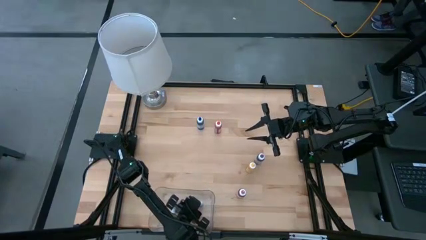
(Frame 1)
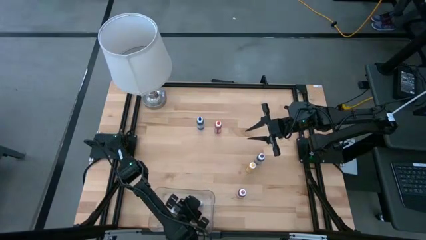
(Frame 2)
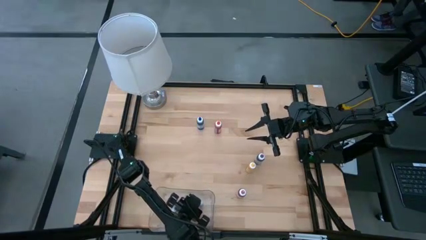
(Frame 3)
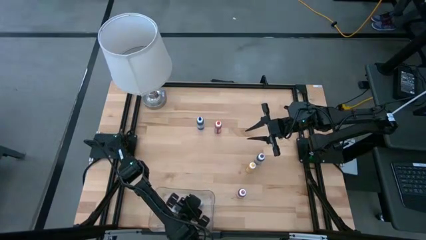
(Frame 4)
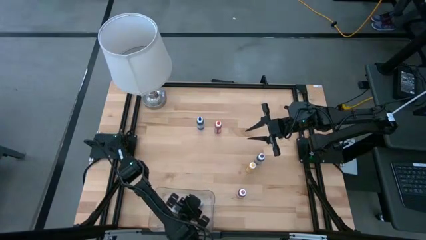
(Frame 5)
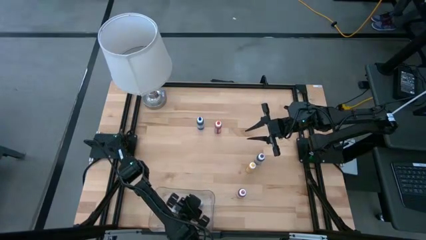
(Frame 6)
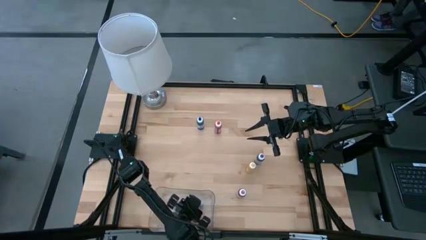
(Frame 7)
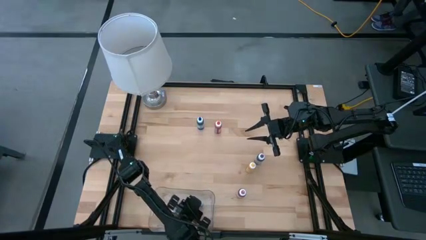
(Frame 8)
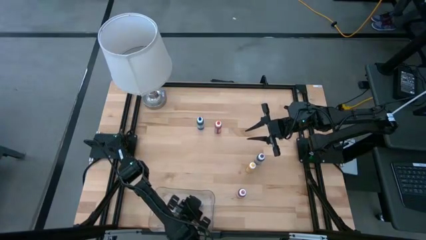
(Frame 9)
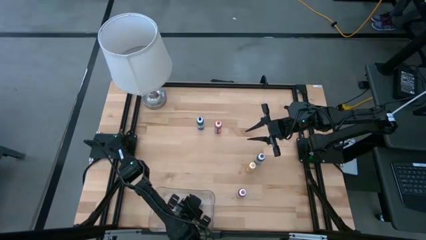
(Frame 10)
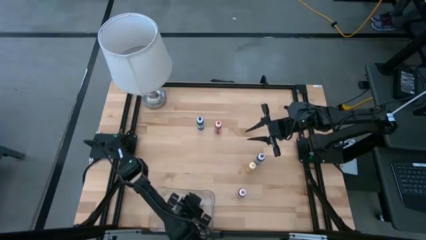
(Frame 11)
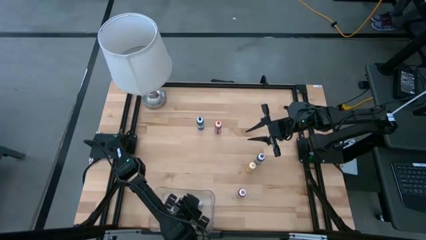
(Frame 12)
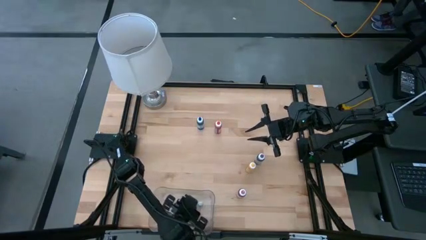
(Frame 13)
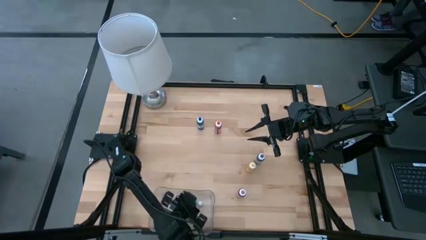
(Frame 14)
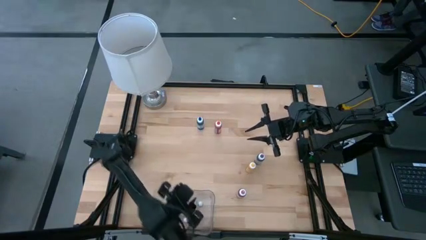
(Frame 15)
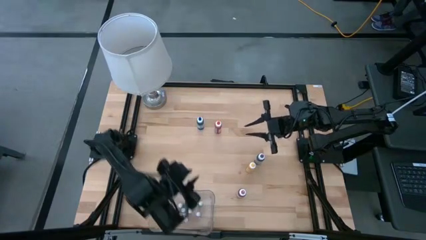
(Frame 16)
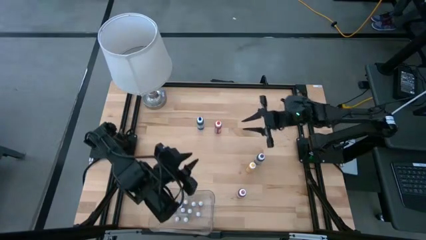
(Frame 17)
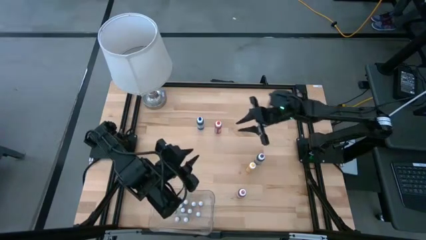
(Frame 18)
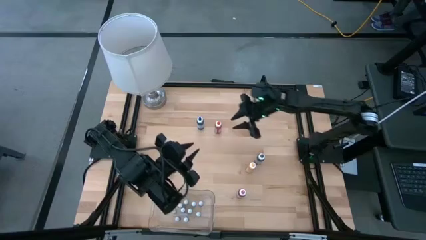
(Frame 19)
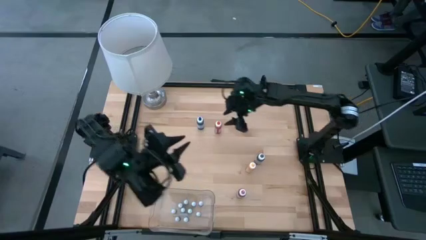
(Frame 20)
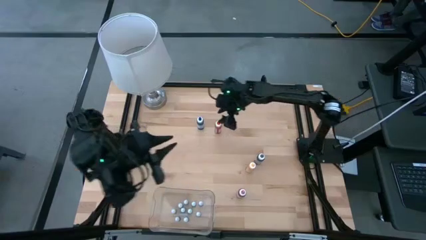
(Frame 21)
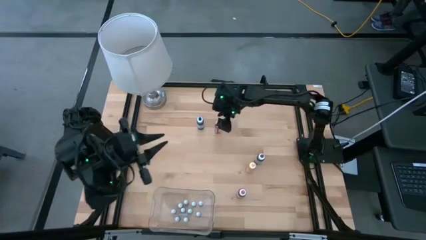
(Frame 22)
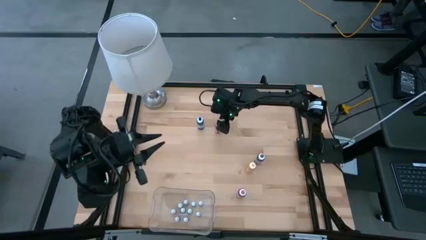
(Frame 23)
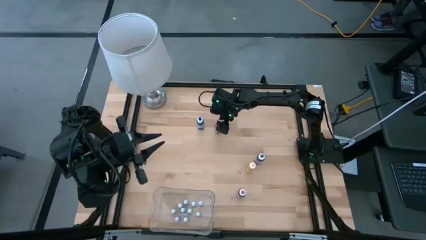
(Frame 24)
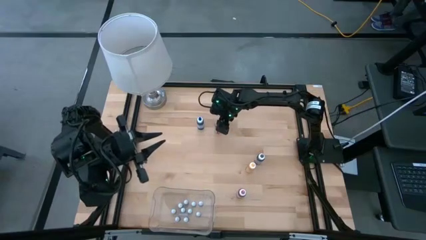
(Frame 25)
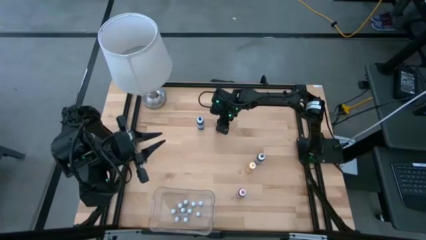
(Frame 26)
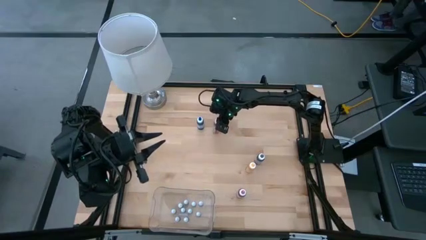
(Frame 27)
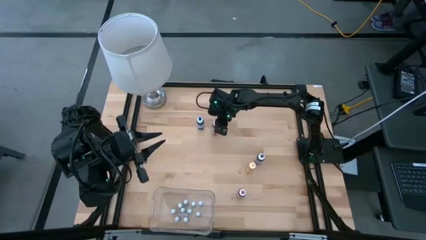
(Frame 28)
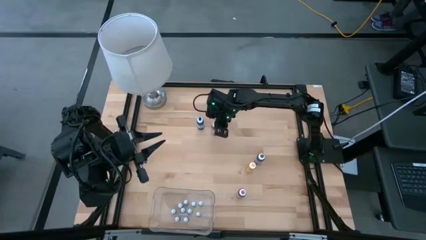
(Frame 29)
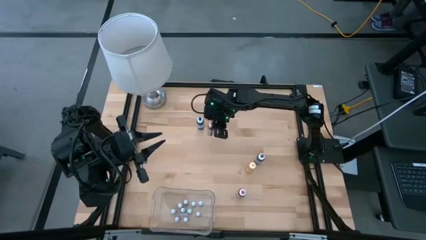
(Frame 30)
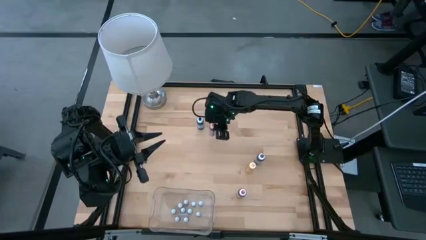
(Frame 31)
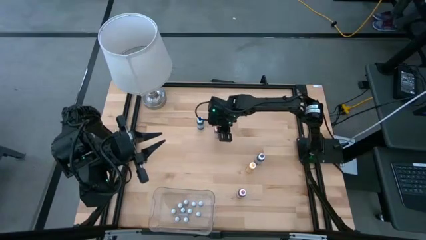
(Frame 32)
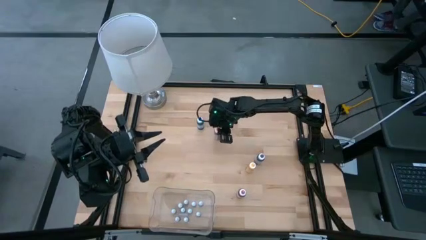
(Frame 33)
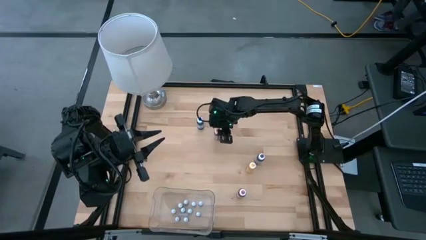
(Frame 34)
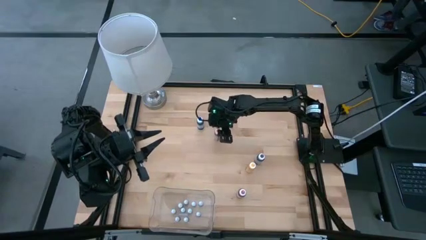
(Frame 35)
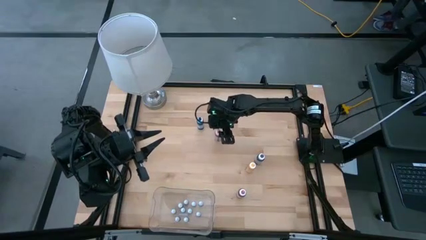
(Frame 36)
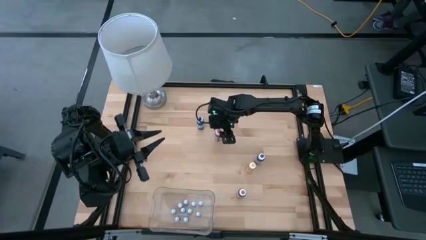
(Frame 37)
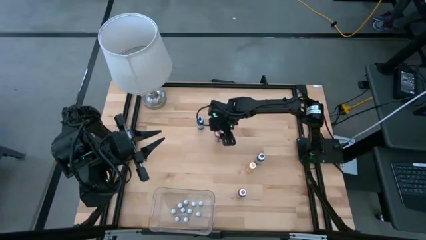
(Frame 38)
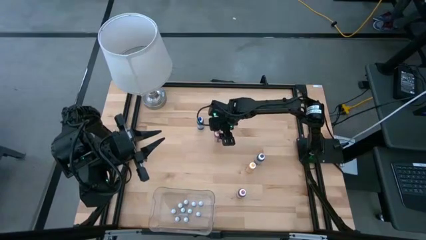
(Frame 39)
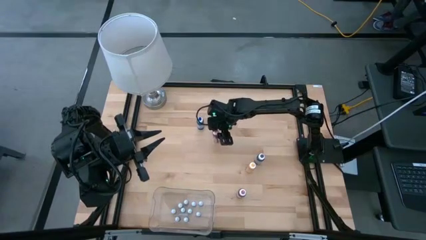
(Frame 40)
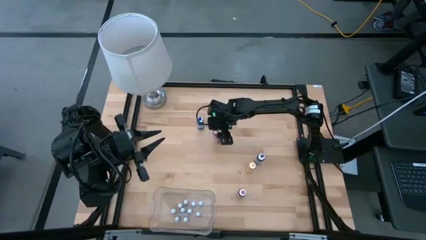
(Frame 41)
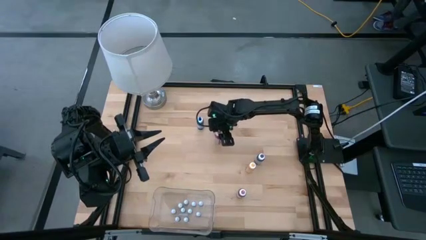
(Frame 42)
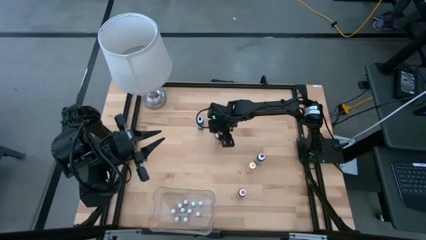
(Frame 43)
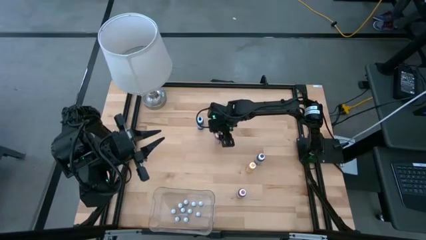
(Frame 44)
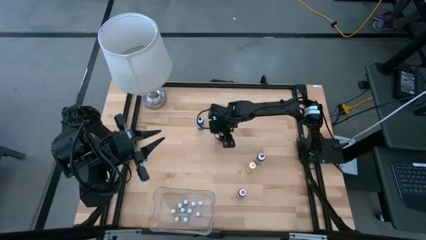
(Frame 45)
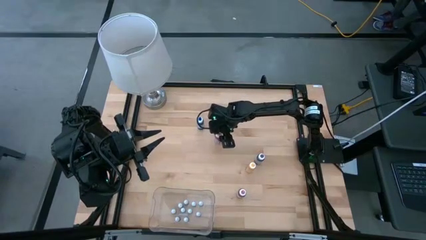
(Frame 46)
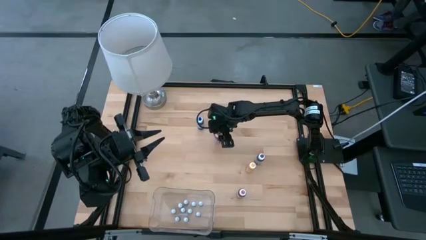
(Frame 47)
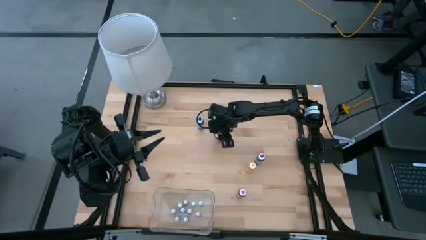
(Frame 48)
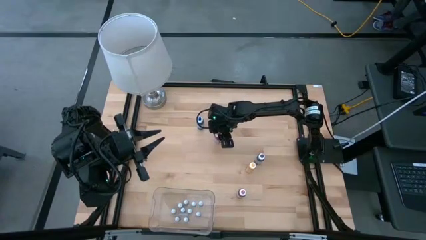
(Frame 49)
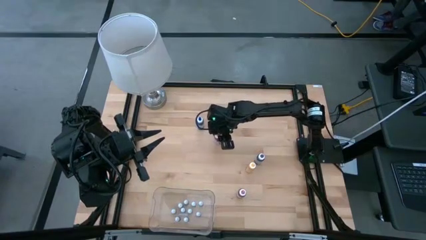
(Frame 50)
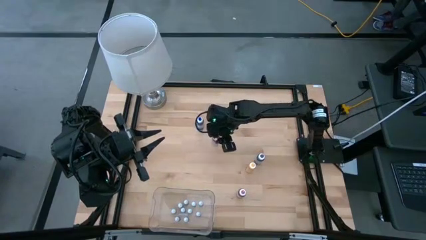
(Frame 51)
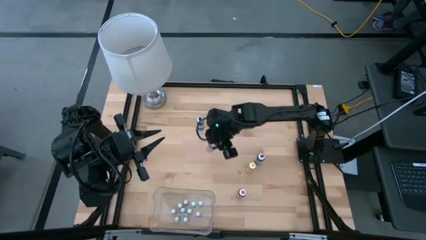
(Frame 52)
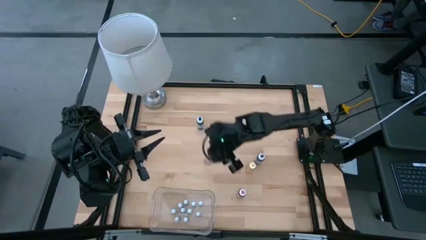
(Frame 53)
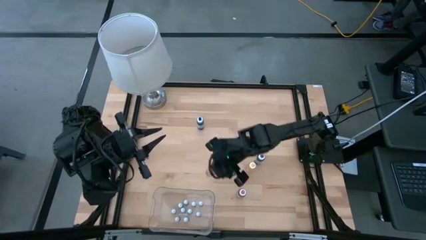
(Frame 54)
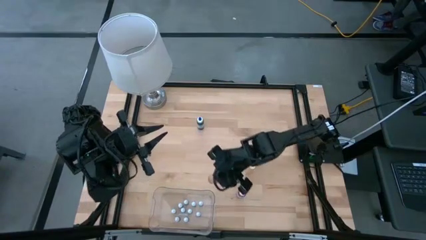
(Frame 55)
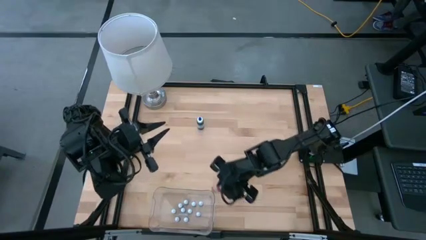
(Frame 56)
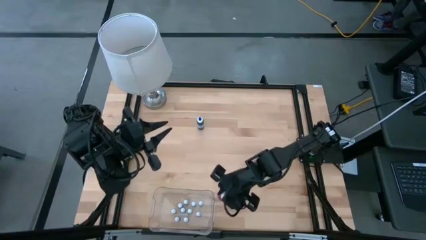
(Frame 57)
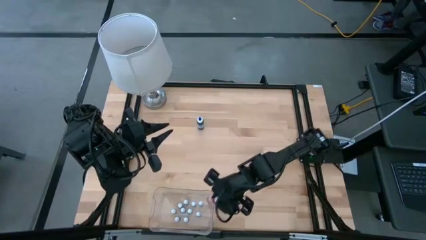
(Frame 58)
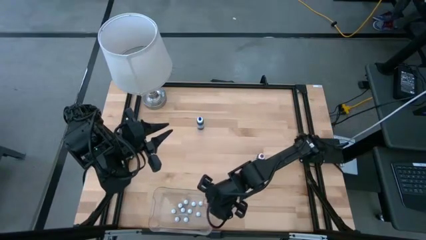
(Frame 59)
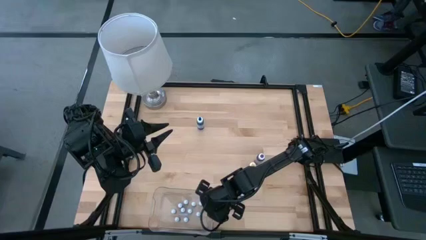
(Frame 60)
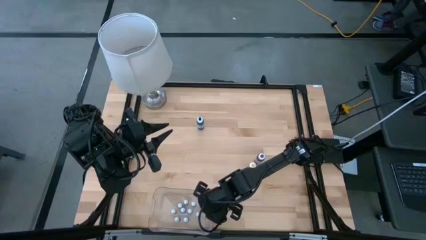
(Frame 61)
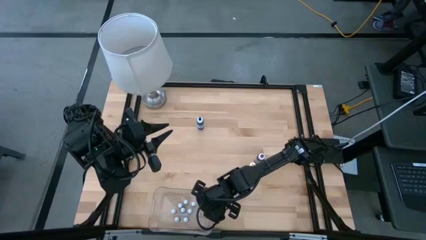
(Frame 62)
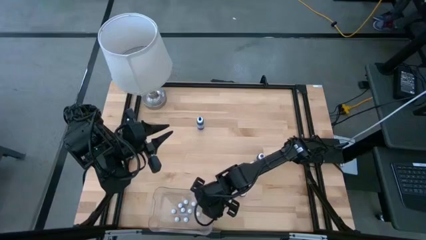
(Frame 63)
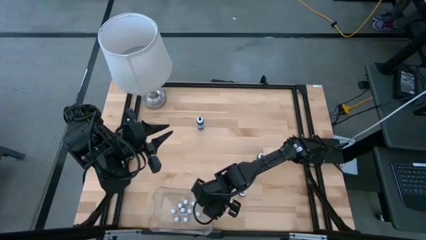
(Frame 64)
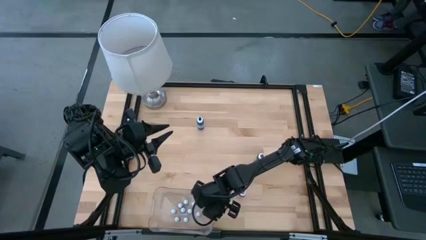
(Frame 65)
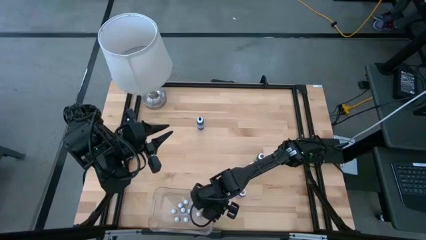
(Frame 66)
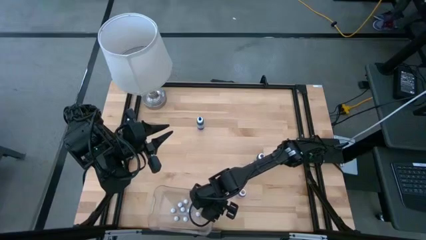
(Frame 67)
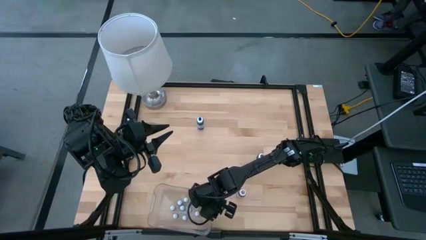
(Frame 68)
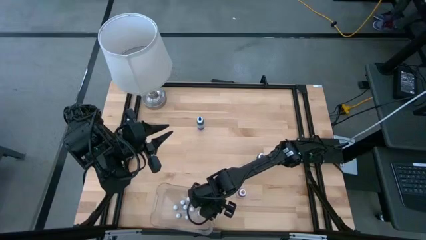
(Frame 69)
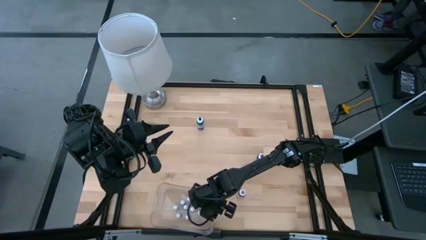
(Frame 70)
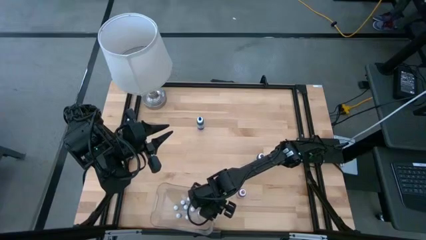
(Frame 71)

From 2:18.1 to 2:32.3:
Task: Pick & Place food coloring
Put the large orange food coloring bottle into the bin

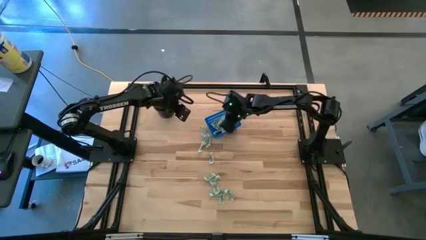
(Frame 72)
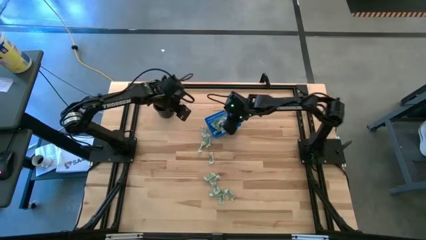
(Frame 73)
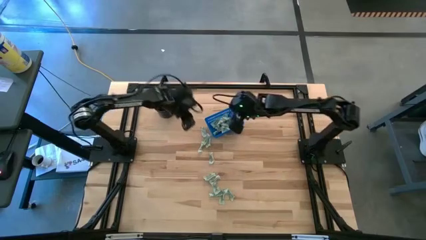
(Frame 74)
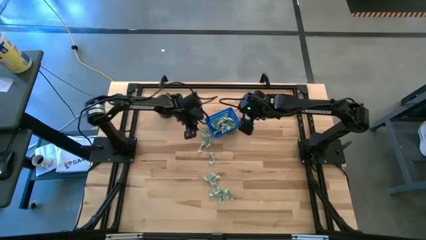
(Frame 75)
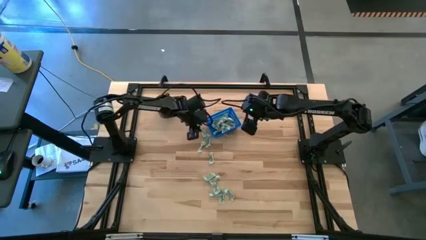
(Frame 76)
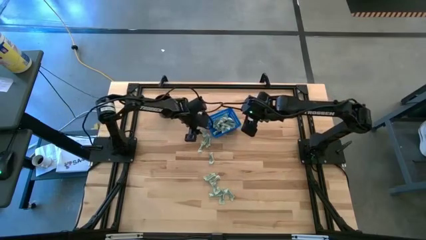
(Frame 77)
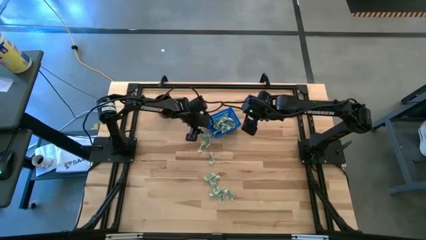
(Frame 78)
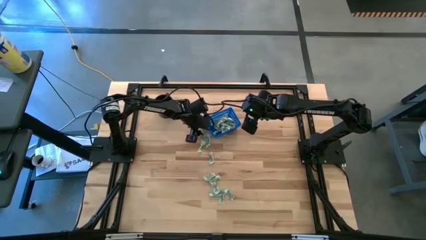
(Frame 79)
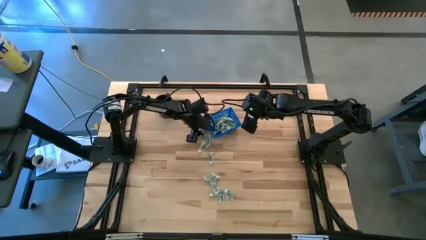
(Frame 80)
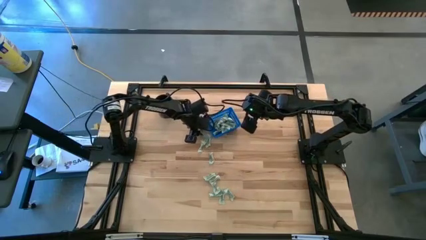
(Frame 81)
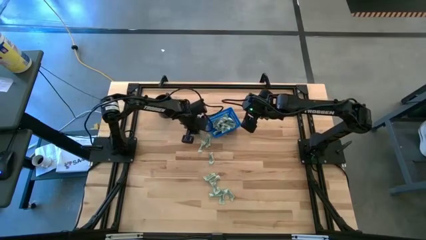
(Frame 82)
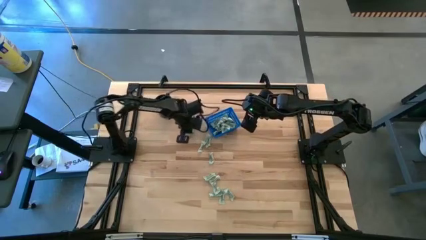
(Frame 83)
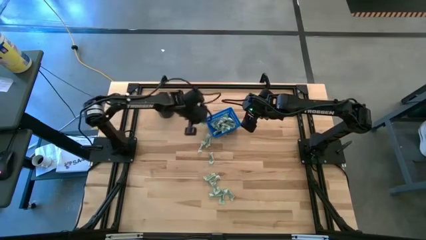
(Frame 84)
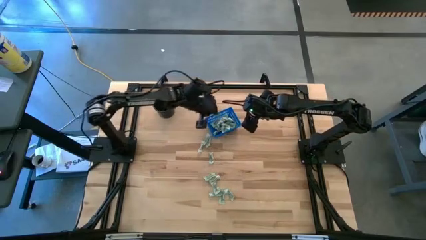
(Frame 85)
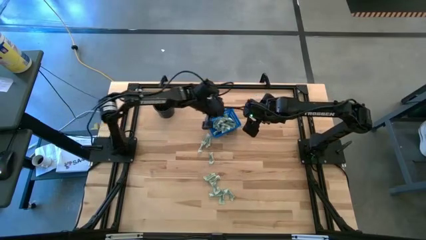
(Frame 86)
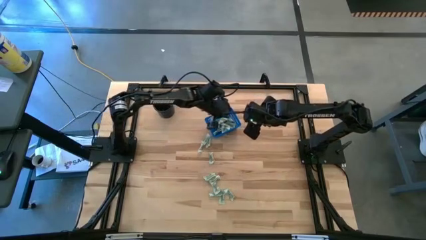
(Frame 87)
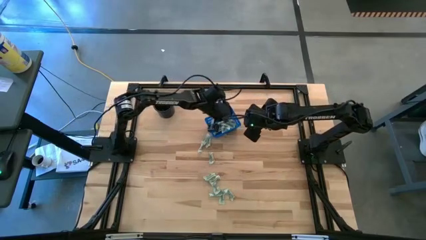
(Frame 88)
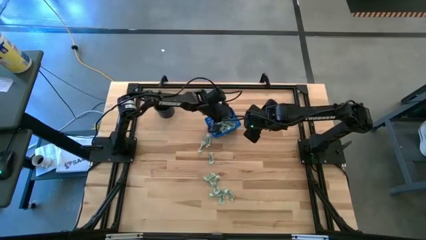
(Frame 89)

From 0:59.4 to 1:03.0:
Task: Pick and place Stevia / Truvia into bins
Put the green stevia packet into the blue bin
